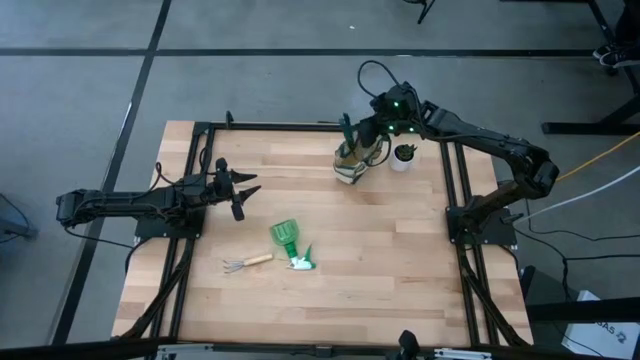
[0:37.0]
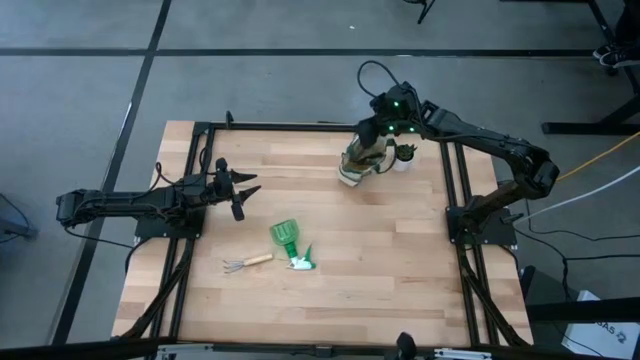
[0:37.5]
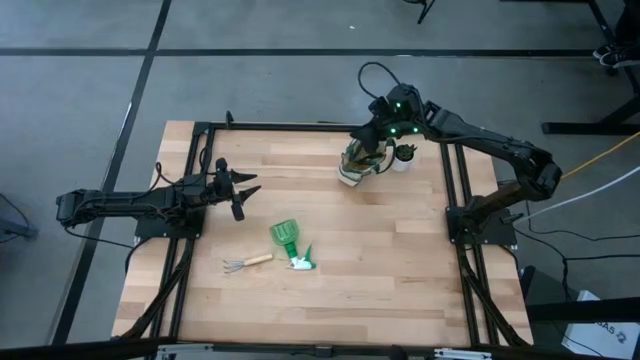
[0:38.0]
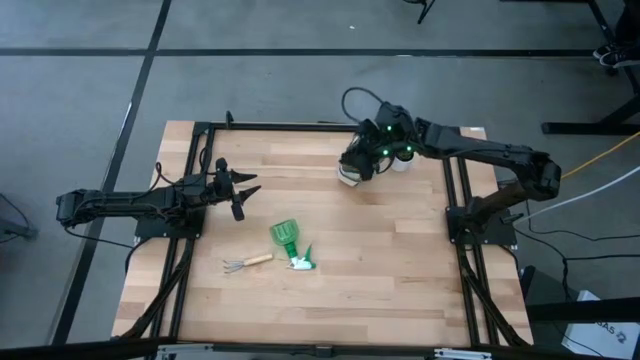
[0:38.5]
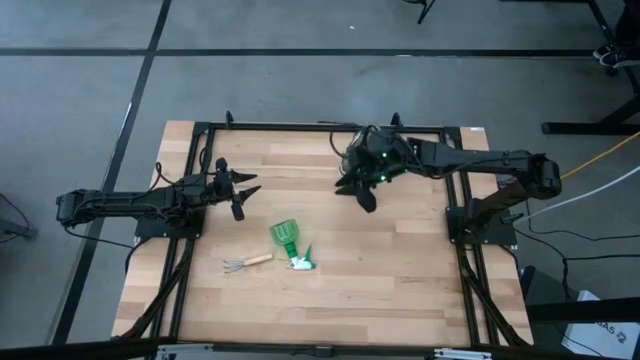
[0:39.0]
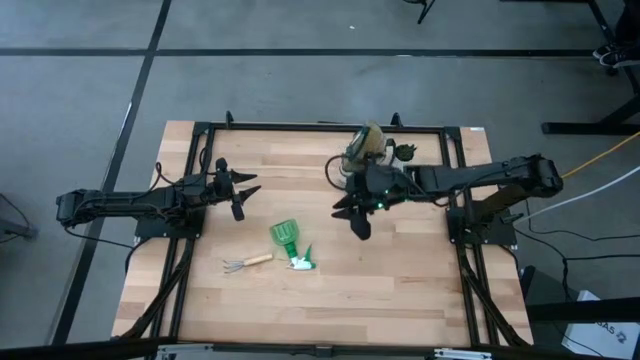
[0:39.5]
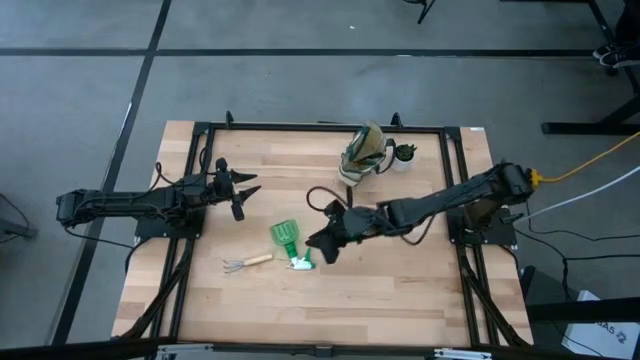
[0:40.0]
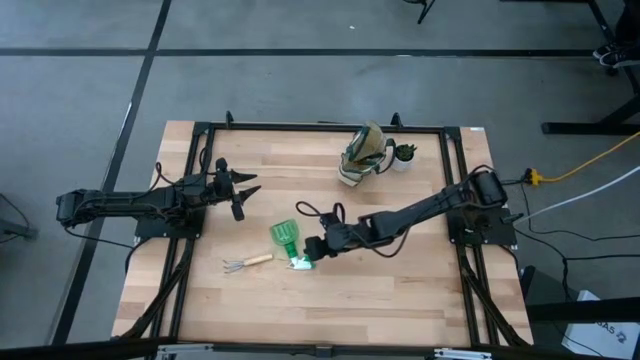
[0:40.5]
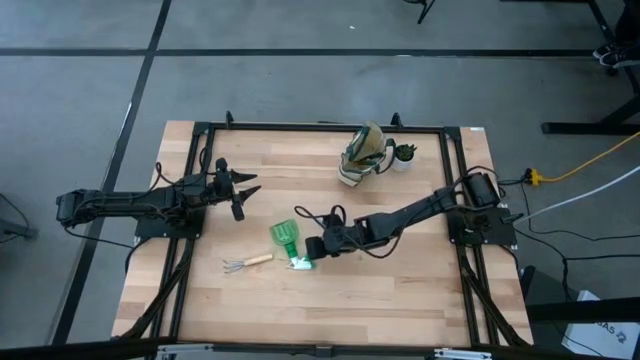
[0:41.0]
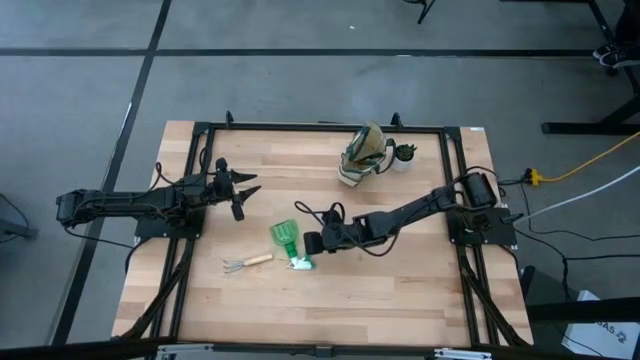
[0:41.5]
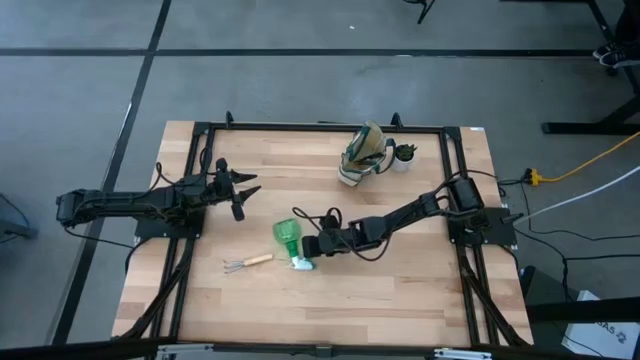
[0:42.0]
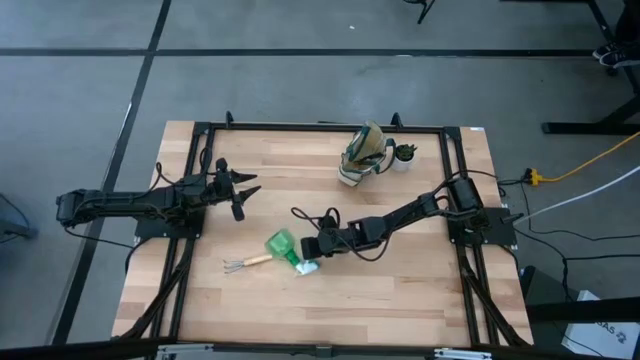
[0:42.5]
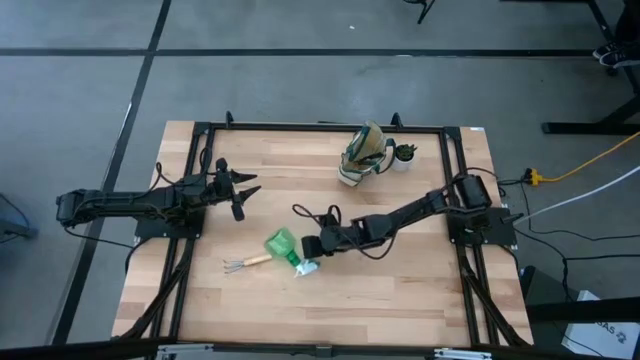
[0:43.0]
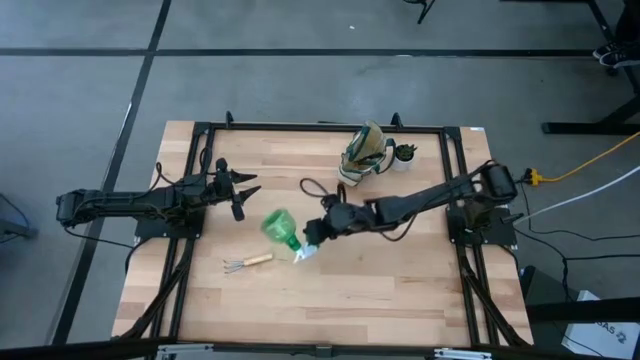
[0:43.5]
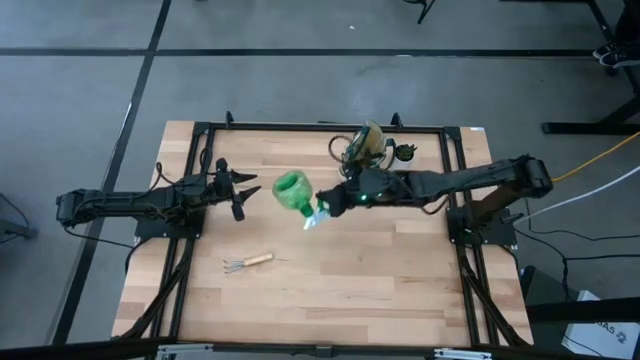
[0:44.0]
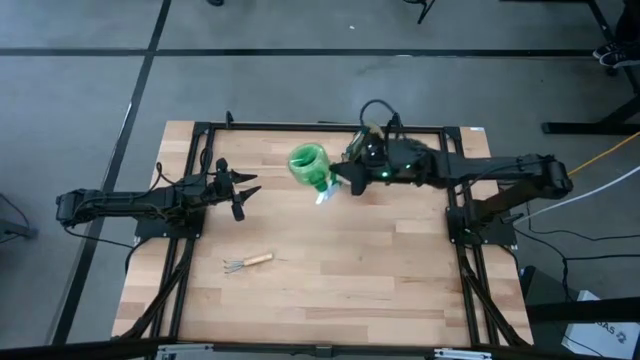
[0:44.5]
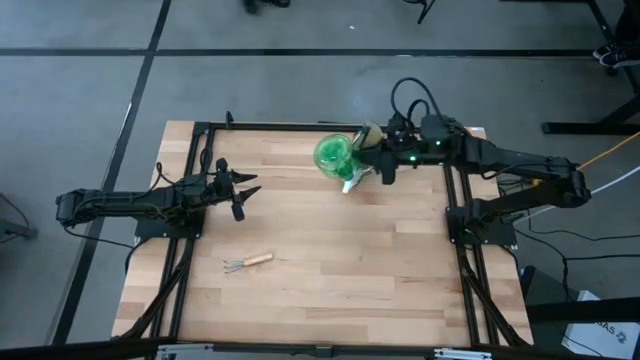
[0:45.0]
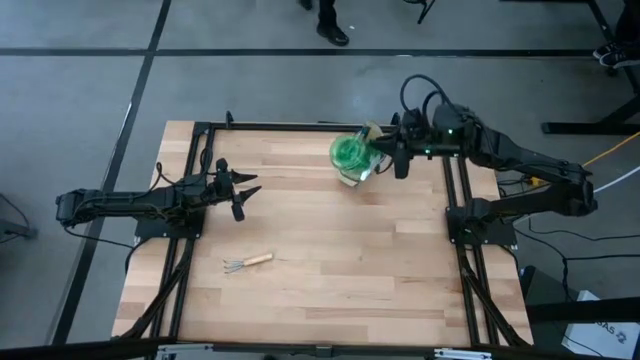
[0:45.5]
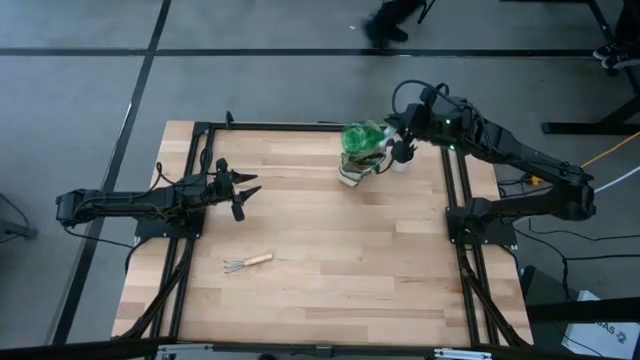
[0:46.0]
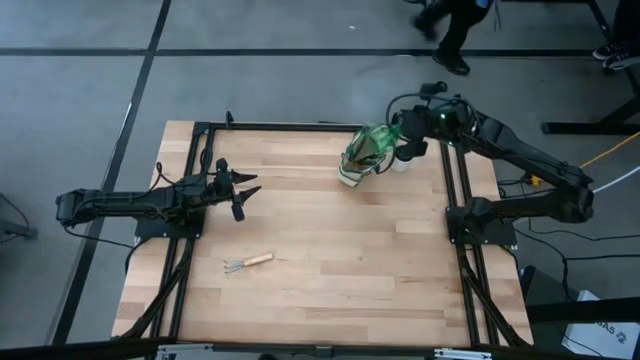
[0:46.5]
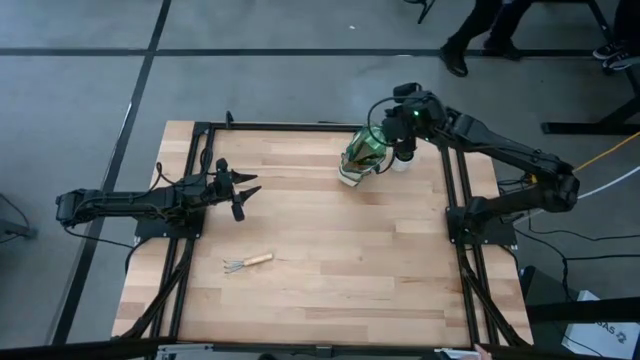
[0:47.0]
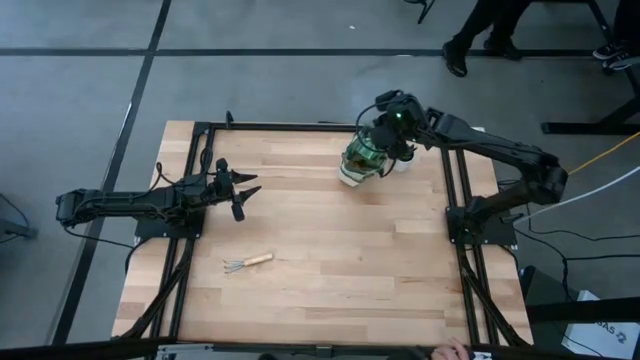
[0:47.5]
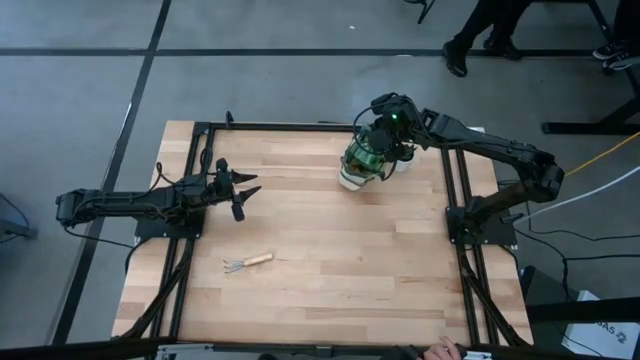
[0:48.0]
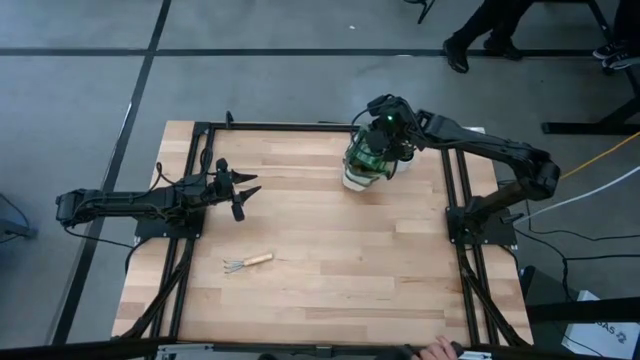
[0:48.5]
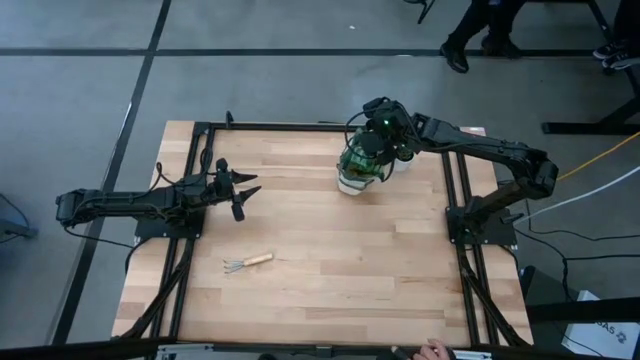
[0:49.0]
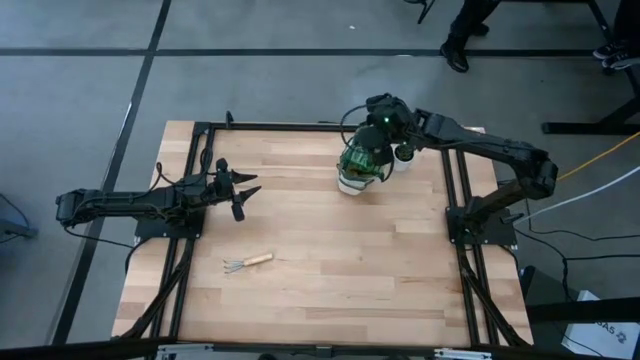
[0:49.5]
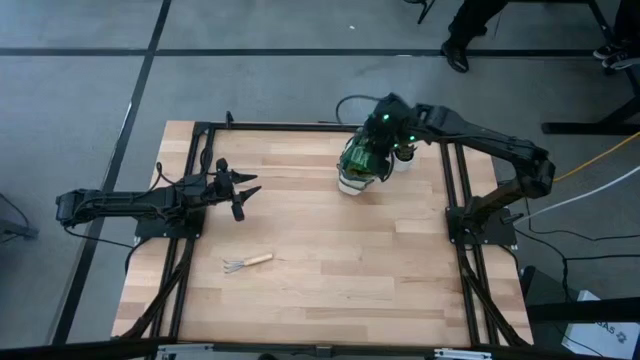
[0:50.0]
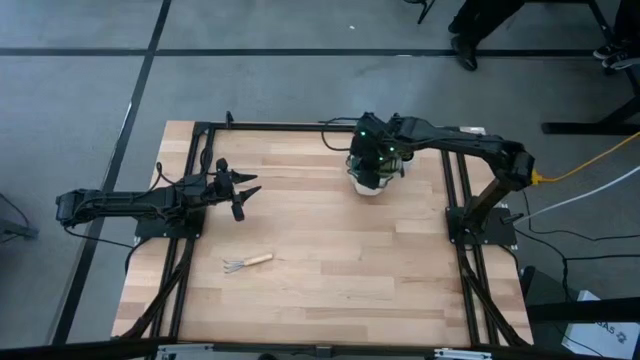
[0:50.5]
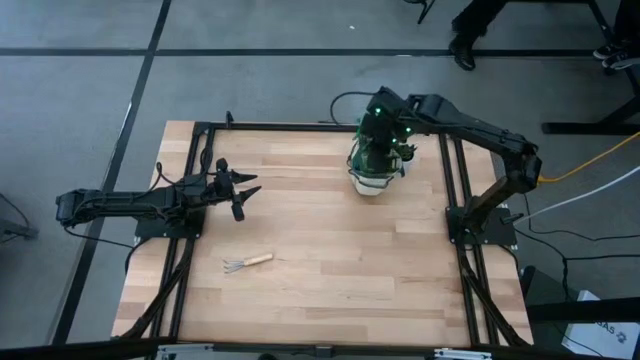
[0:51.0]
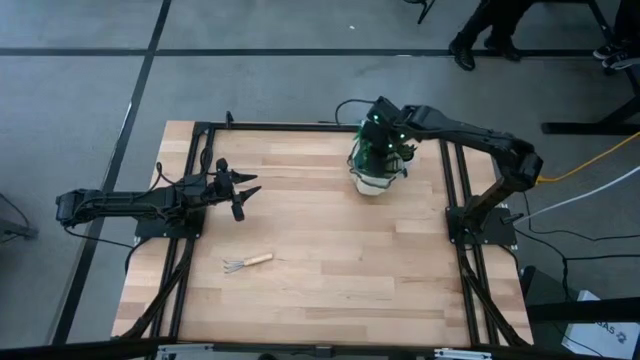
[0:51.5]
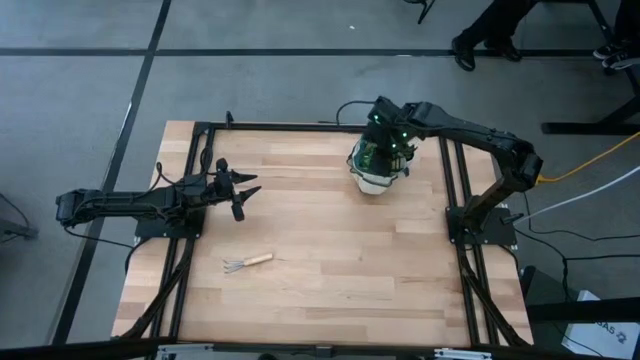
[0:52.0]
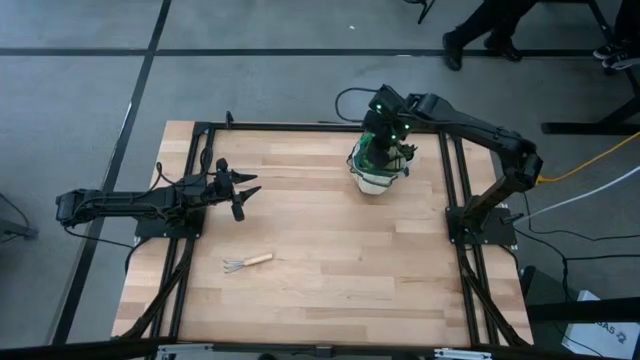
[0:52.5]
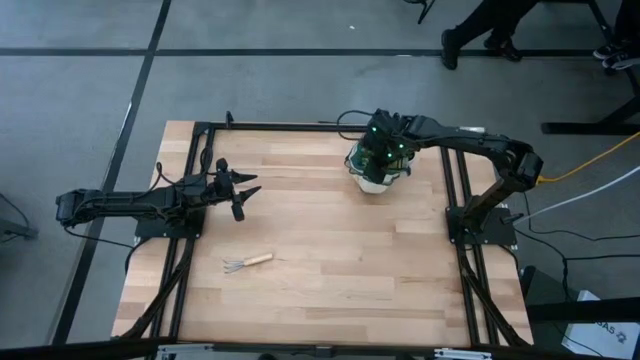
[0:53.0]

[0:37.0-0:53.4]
Task: Pick & Place Garden tools in Gardening bag
Put the green spray bottle into the brown gardening bag
